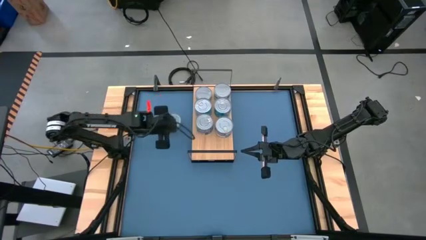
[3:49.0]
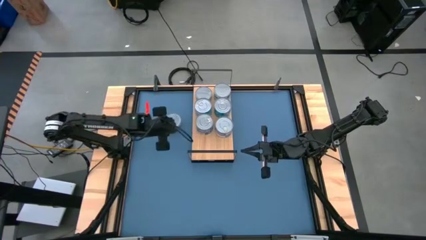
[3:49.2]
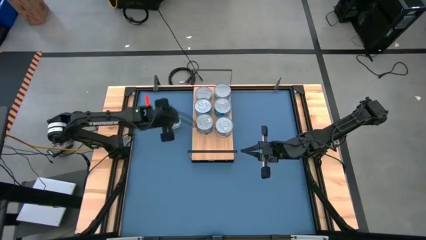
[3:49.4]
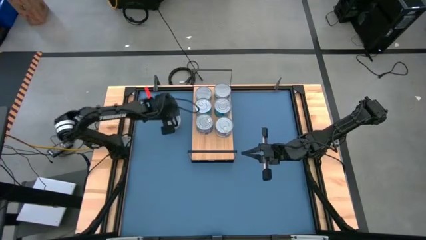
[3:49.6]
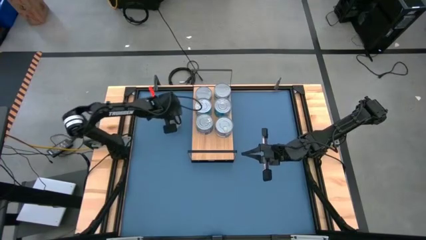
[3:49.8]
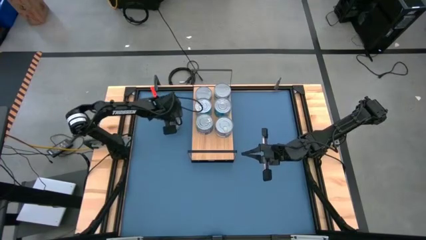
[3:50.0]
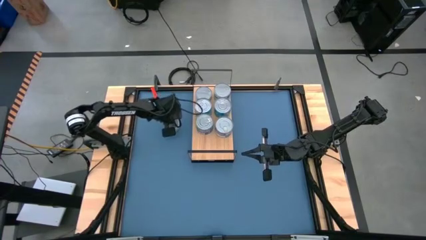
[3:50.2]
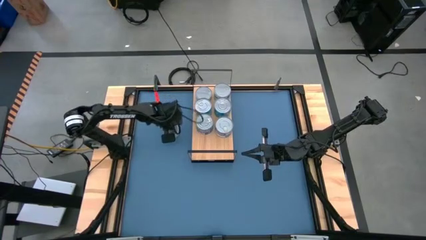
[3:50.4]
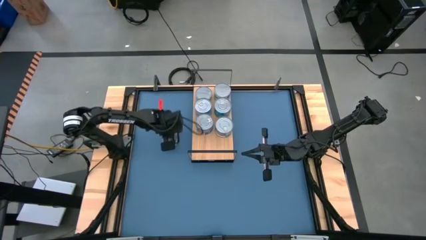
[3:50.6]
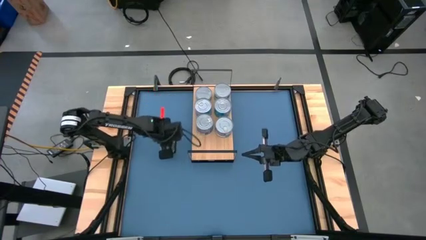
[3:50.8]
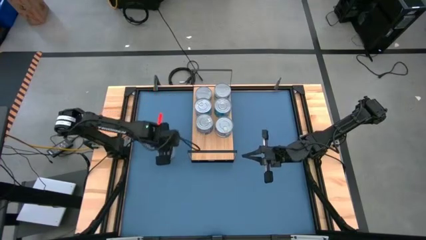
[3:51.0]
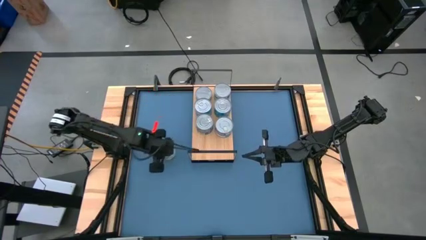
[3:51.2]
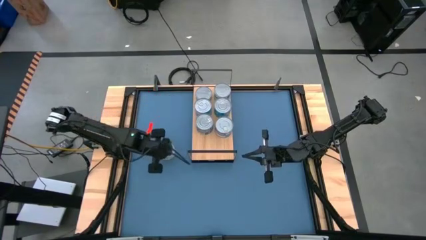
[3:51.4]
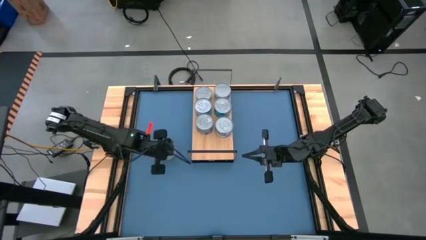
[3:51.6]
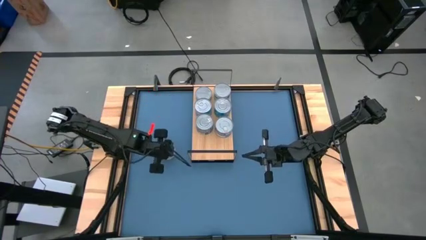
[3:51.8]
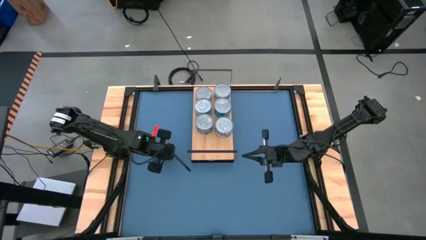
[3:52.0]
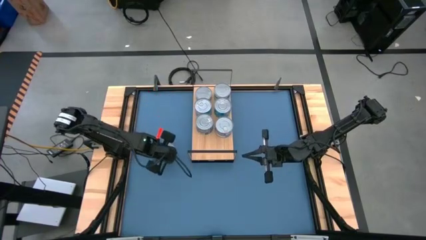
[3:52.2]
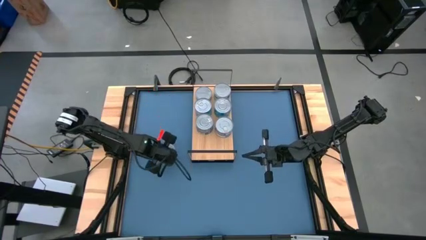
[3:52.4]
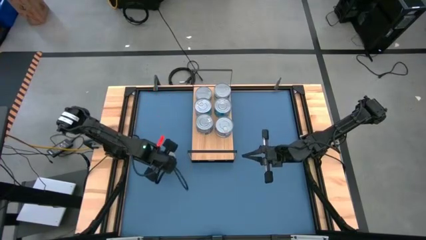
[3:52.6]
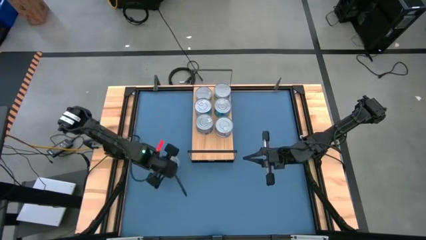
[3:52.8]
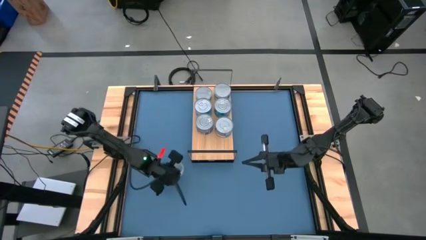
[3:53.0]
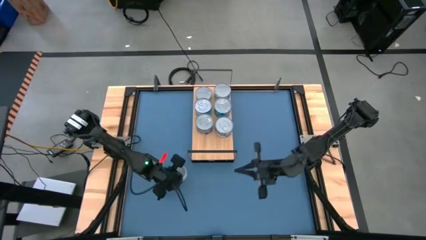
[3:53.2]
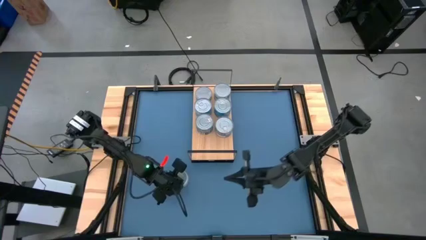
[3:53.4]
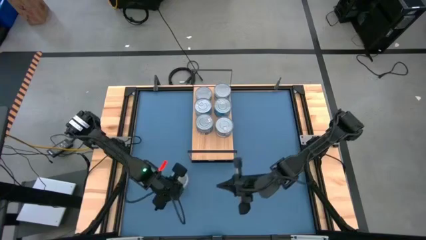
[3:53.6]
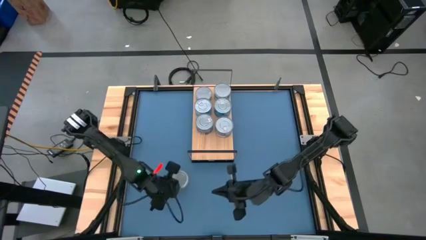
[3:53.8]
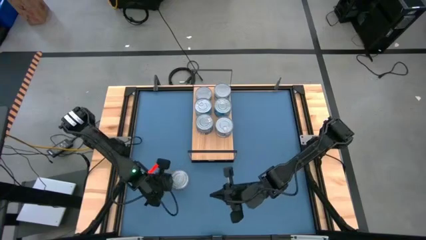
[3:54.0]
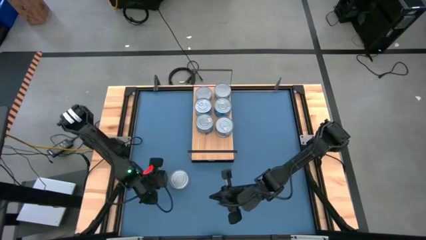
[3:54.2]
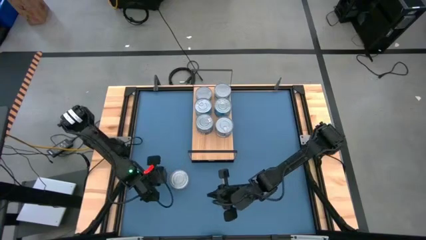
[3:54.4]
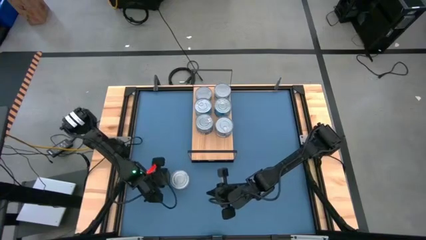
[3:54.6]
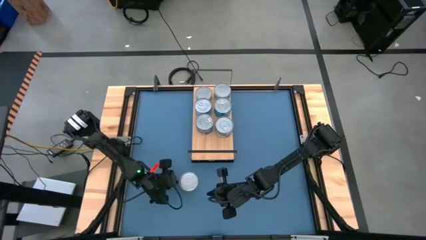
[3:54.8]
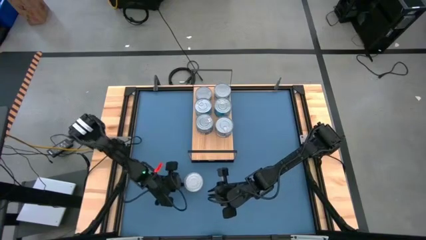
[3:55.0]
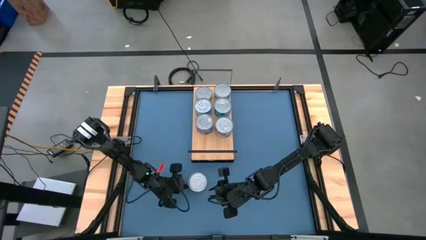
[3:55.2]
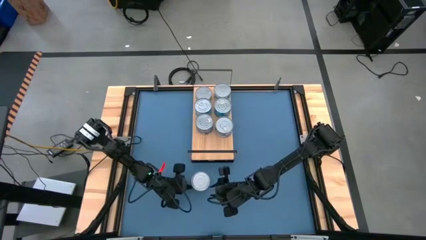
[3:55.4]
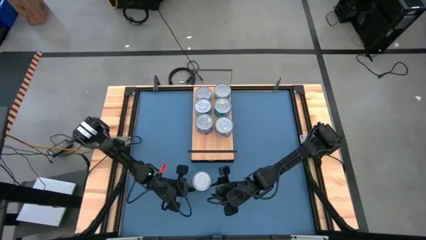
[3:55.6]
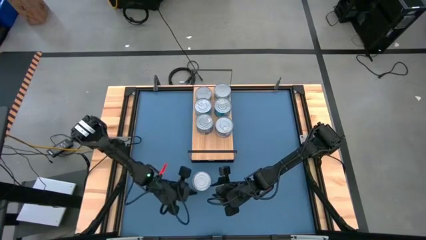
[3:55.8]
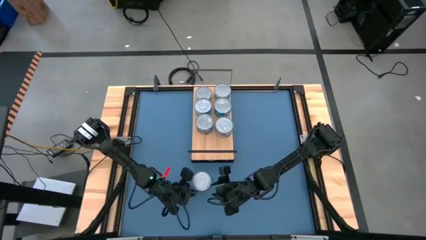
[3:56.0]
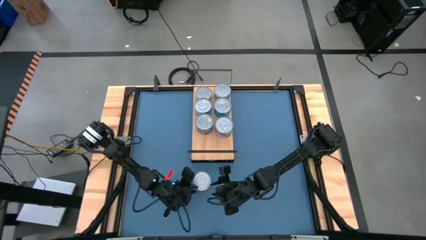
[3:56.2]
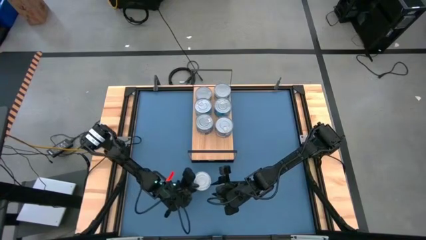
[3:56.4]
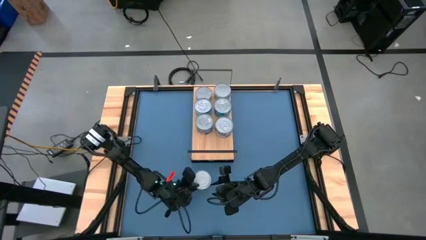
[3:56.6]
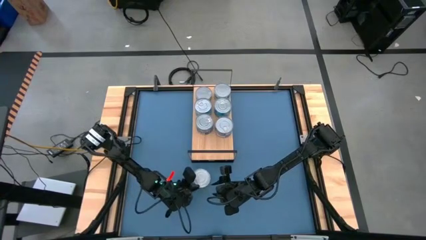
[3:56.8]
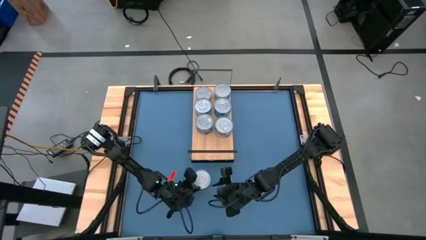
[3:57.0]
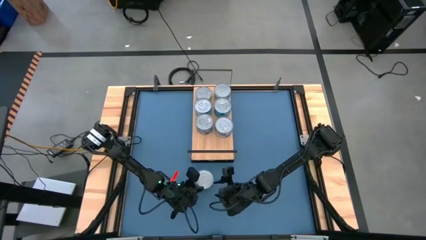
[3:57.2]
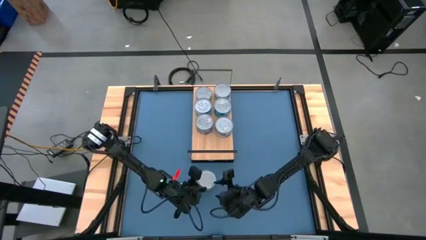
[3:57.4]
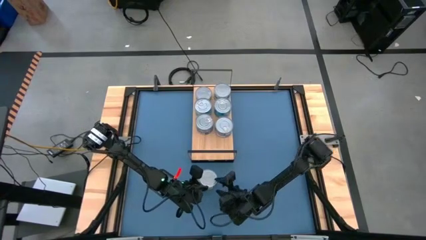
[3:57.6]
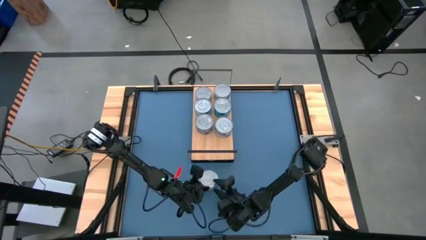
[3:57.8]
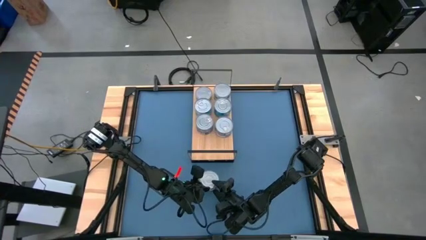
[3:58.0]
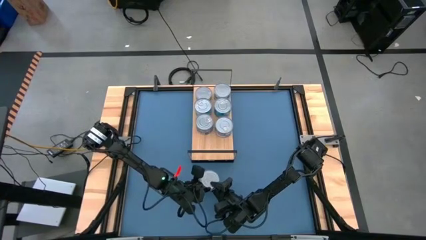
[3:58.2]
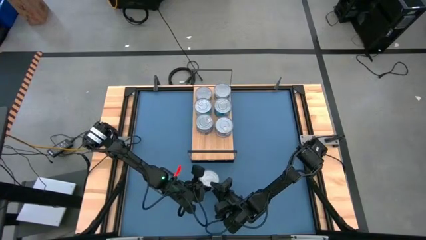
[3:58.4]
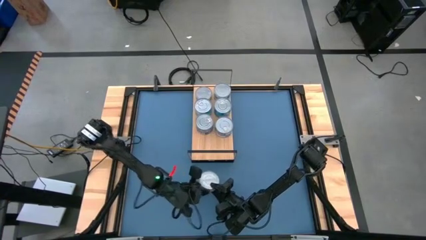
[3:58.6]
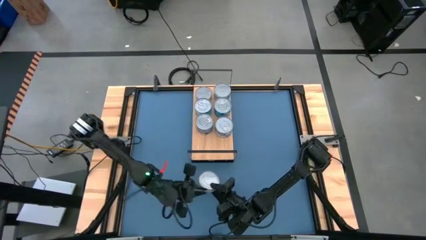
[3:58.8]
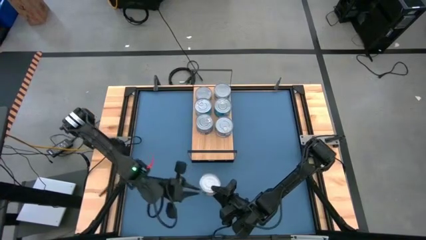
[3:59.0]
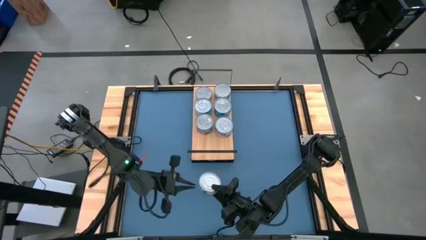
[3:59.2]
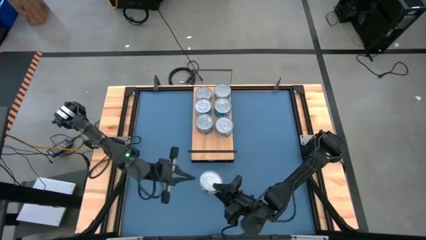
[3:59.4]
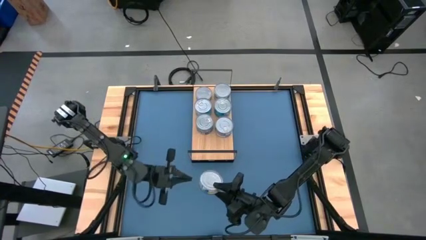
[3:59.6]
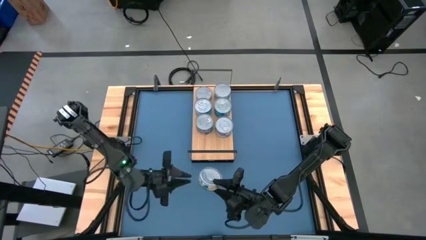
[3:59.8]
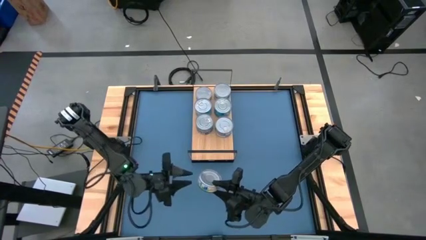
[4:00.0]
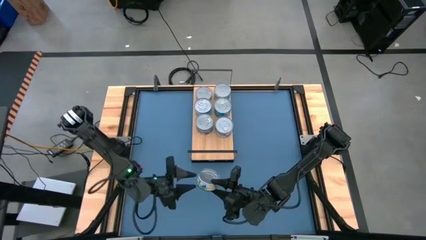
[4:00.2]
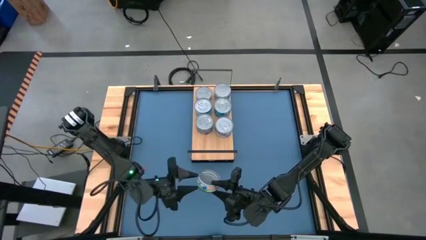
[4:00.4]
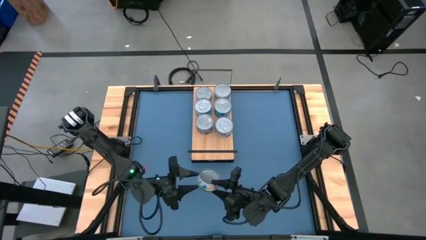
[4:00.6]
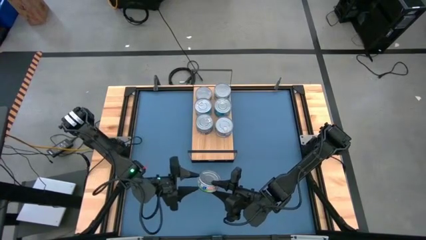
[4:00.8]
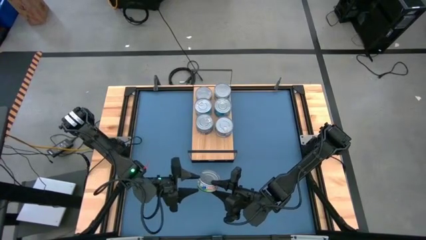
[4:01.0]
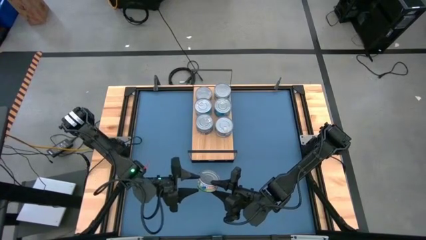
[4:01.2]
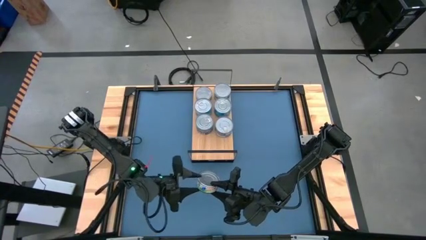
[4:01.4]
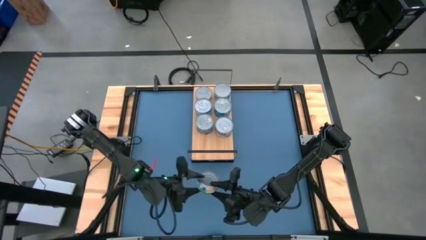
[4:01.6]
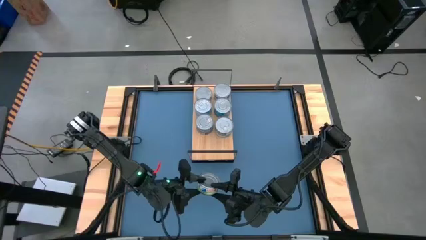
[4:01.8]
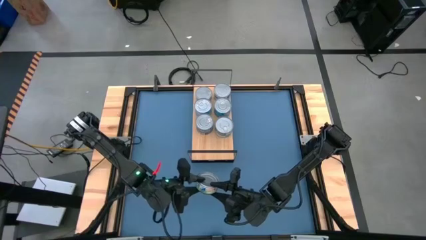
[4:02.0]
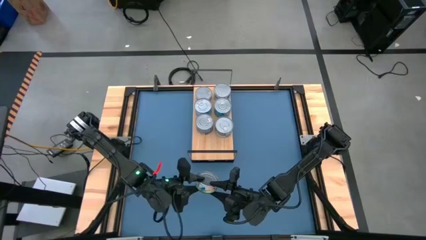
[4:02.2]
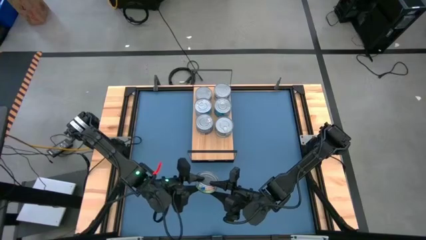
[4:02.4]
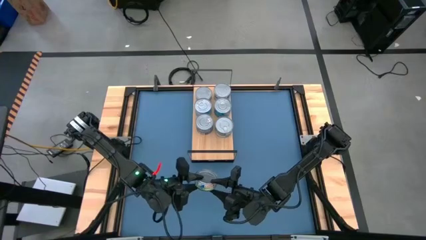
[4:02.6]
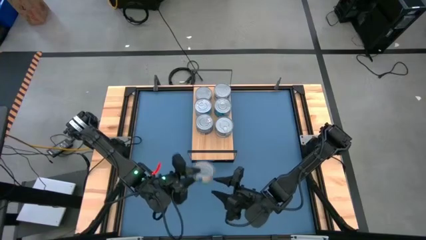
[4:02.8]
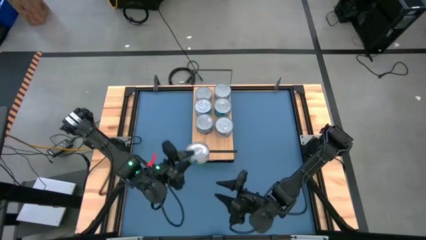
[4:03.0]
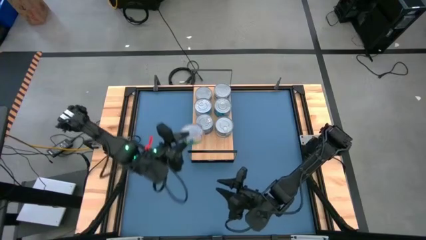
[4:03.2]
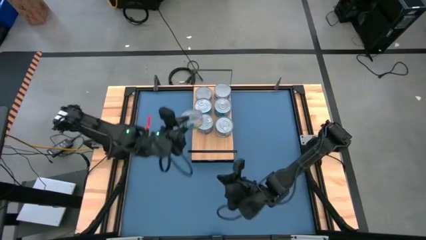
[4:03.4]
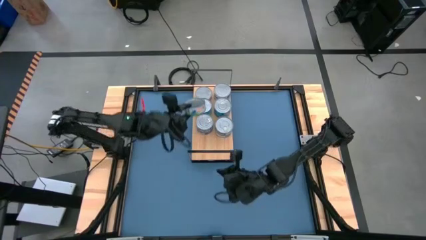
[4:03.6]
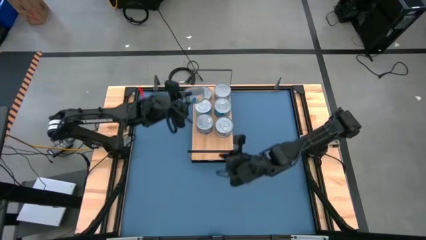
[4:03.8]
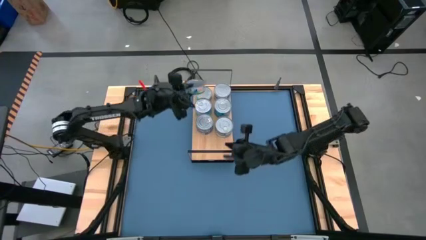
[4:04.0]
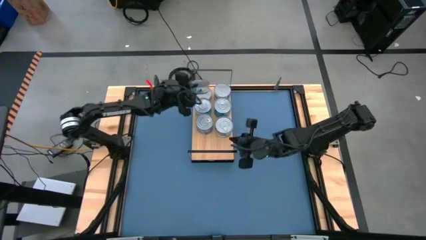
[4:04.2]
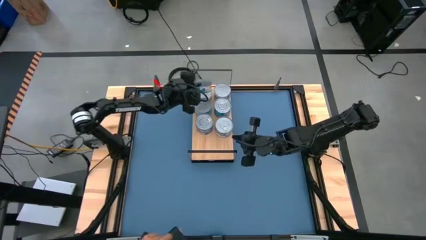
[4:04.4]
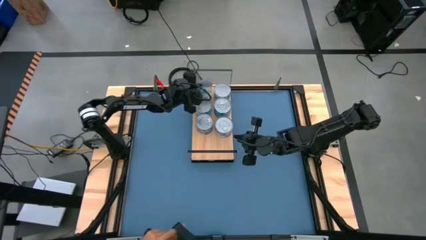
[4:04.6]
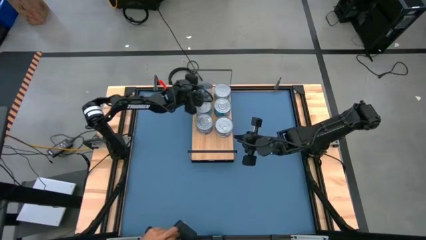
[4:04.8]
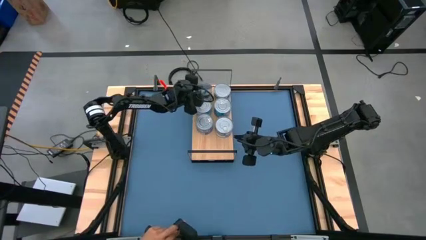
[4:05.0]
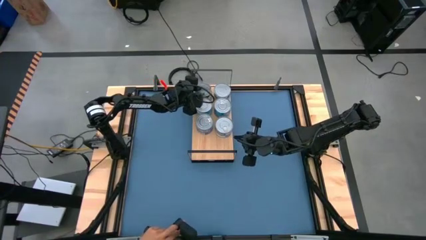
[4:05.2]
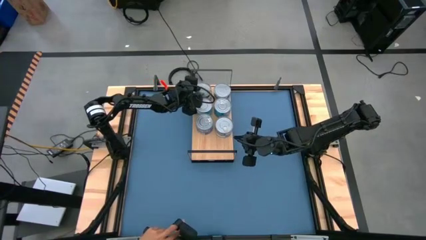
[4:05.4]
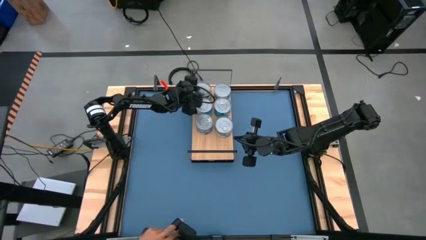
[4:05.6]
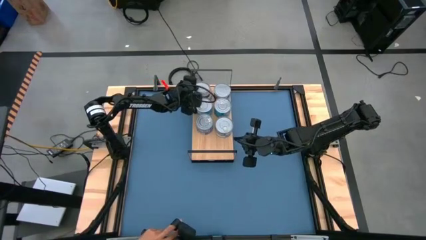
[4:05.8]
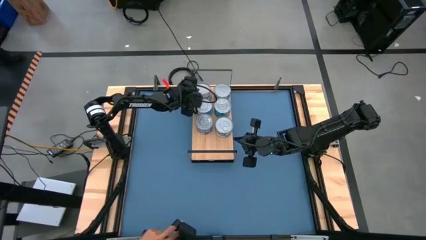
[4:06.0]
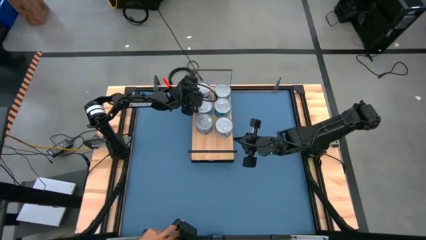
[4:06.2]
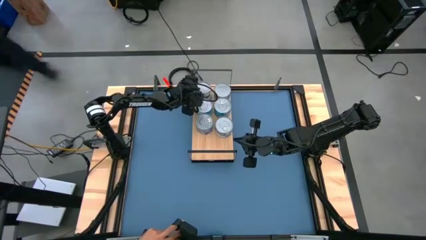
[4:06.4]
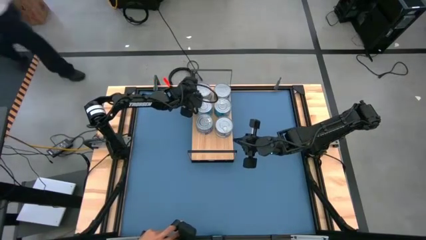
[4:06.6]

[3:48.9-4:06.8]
Task: Stack canned seafood by type on shelf
Stack the green tuna can on top of the other green tuna can on the shelf
